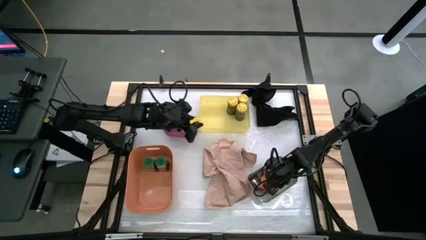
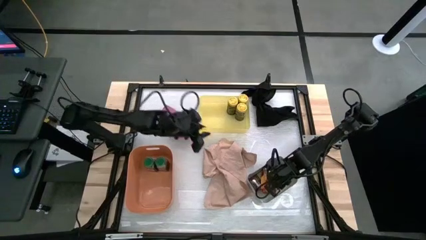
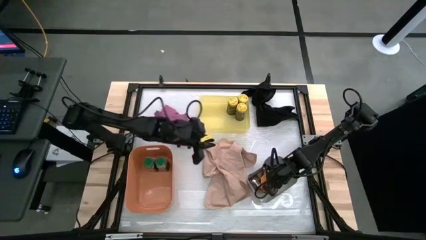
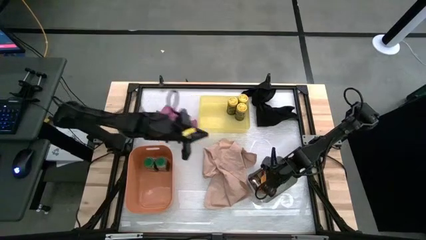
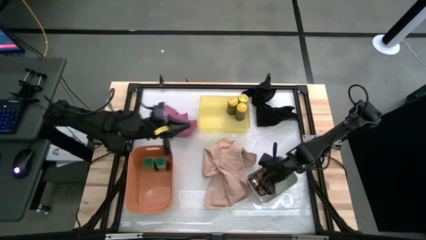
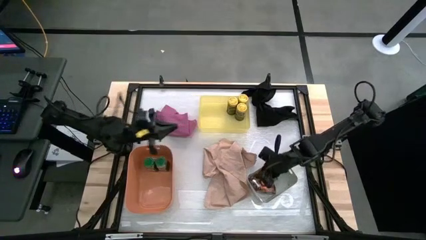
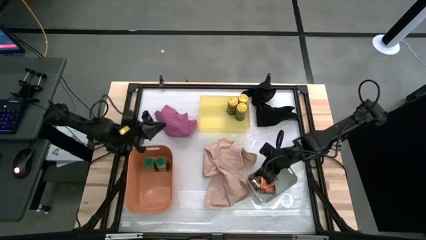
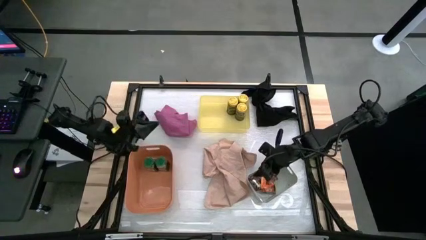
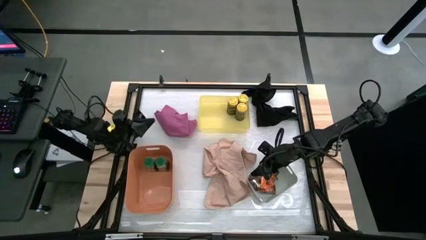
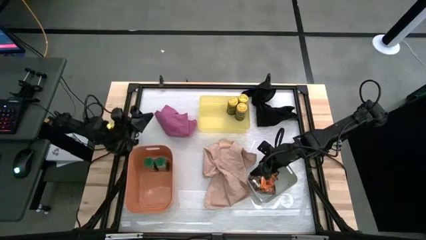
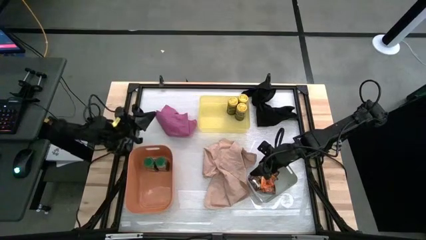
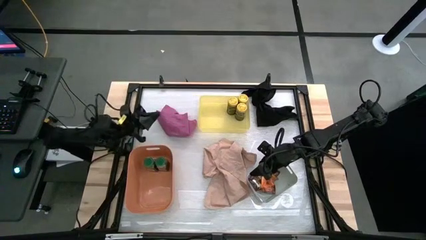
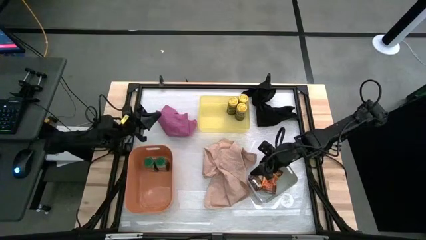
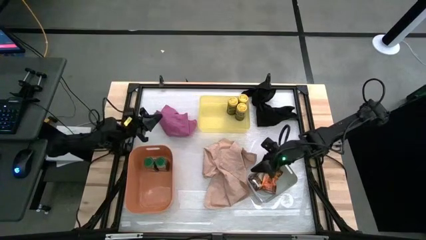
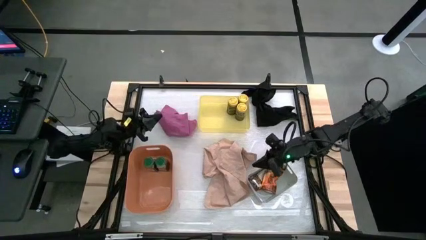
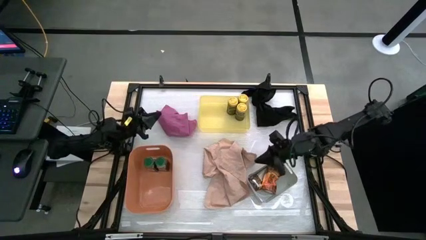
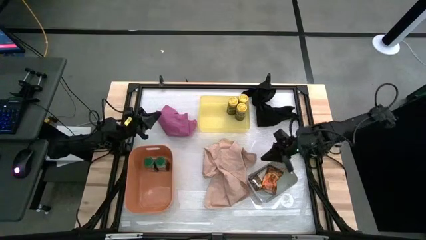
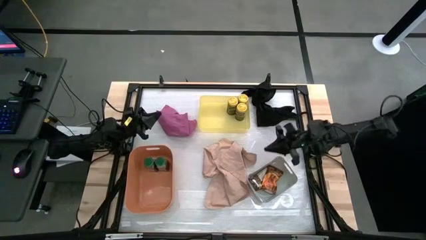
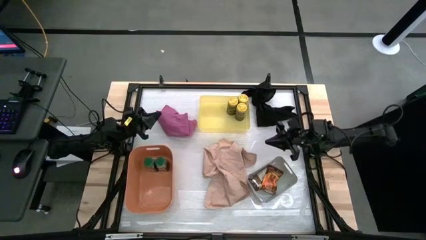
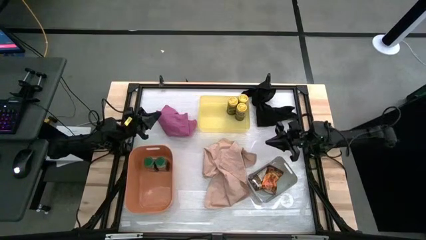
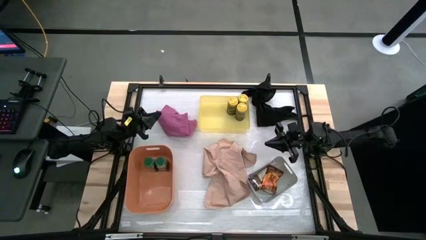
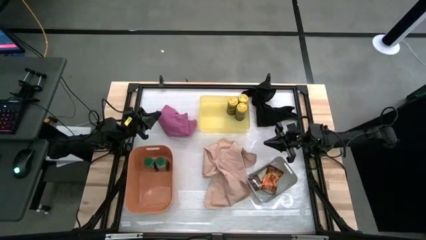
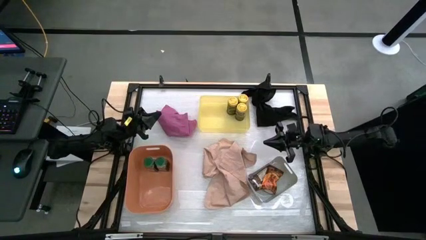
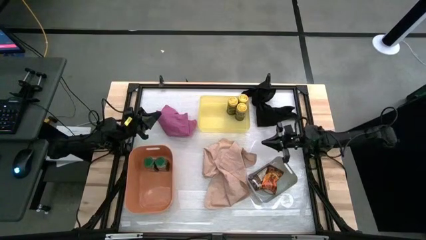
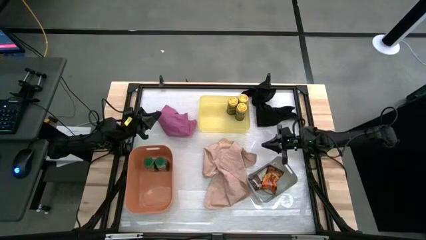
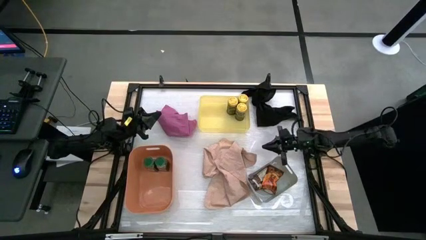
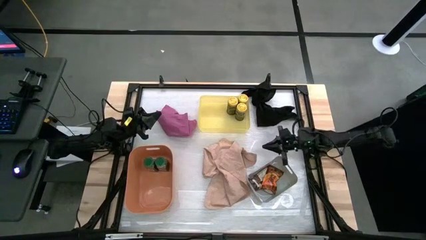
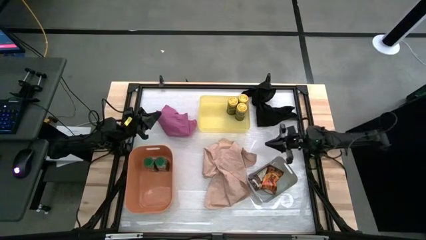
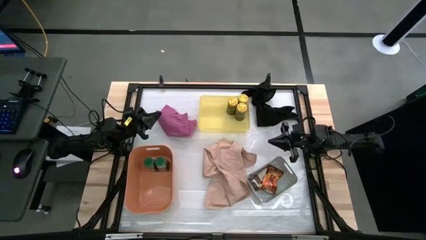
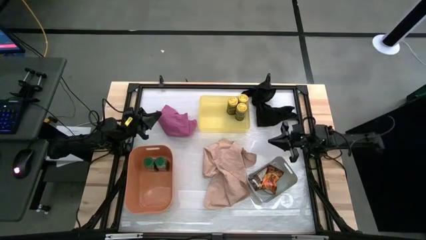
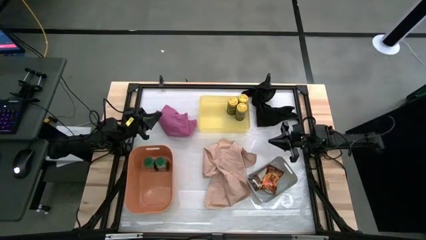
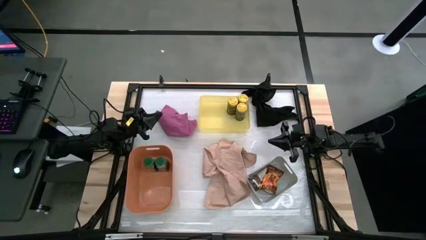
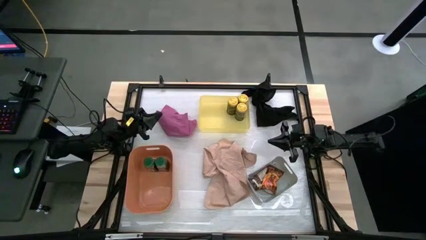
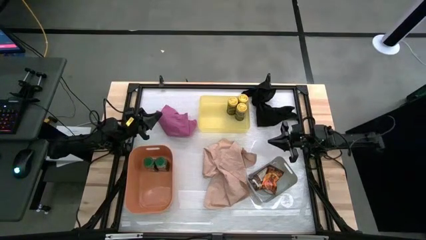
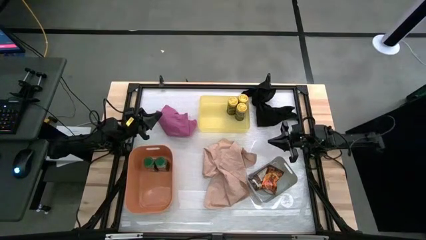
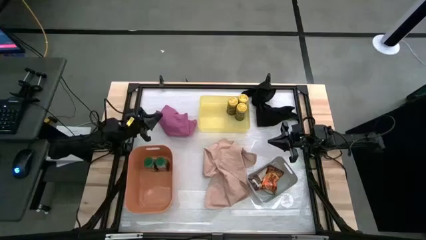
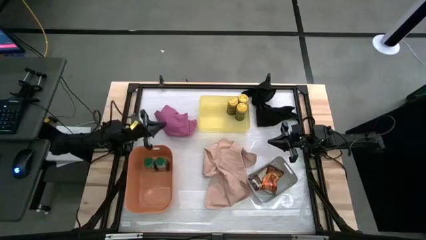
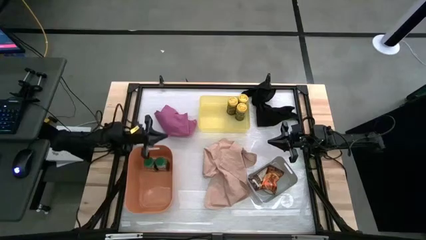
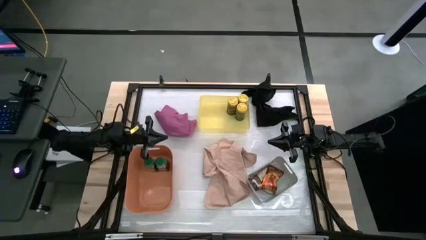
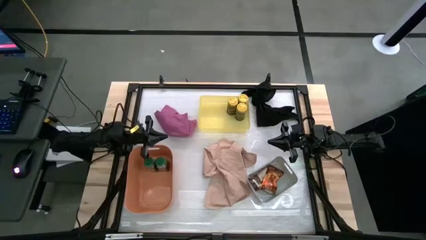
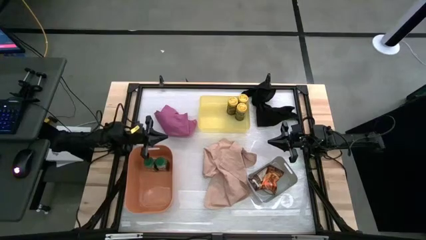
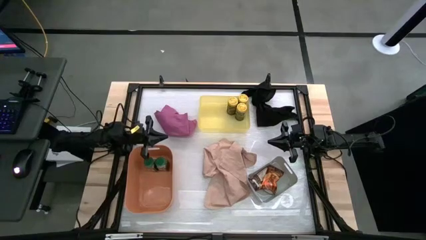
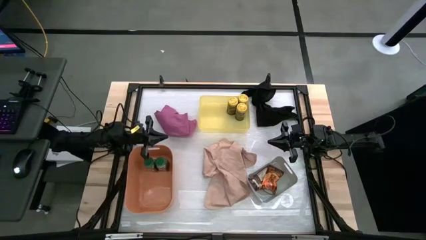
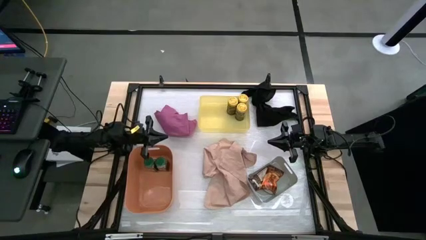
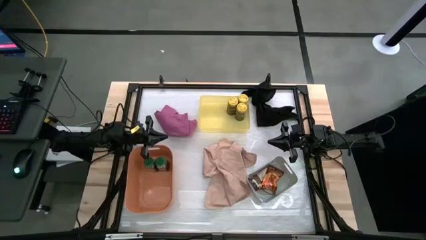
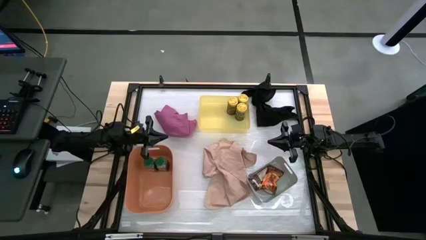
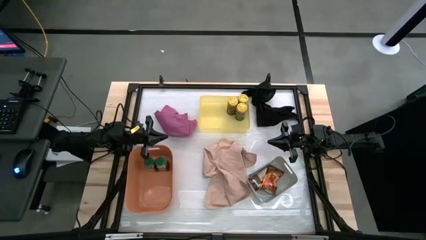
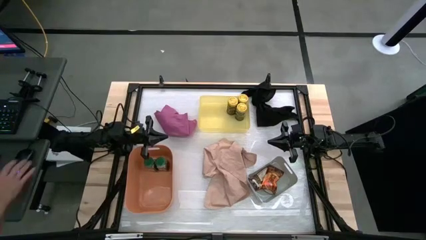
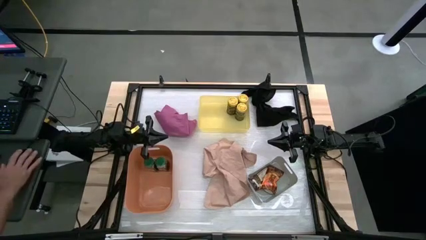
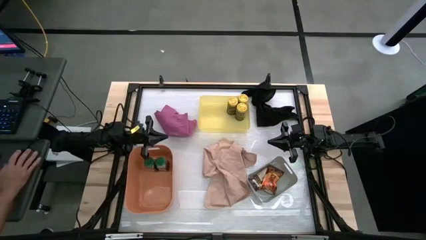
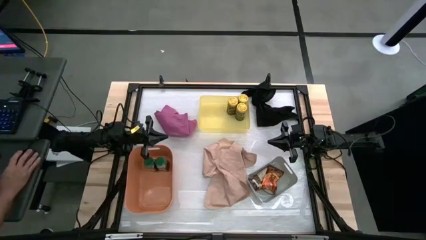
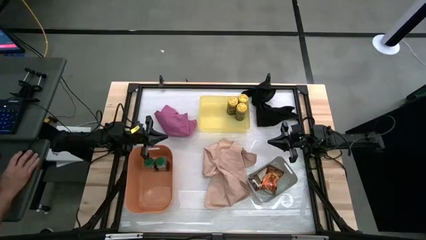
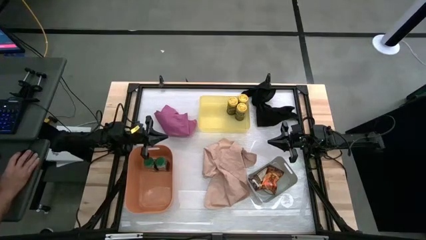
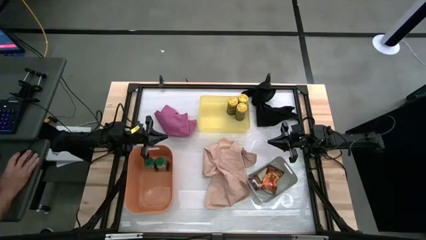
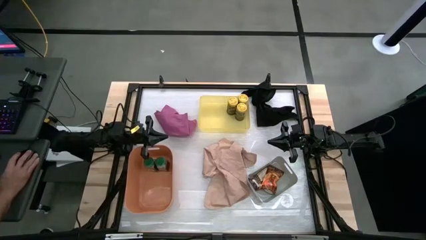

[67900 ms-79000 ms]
Task: Sort spices by type
Return to Home Position

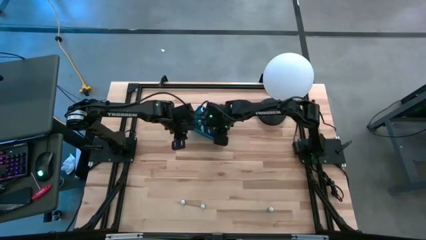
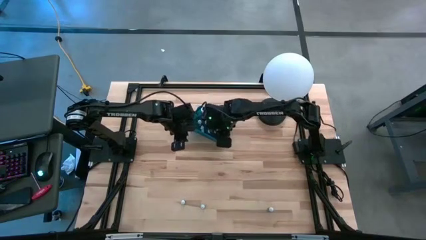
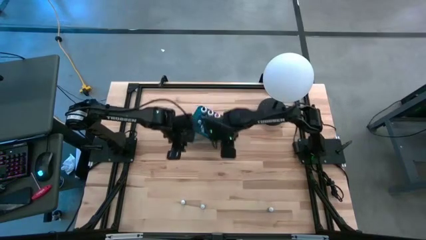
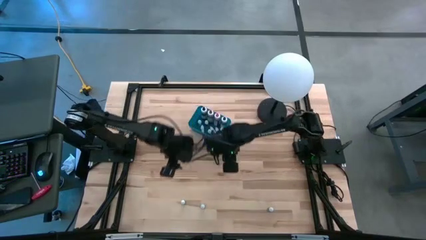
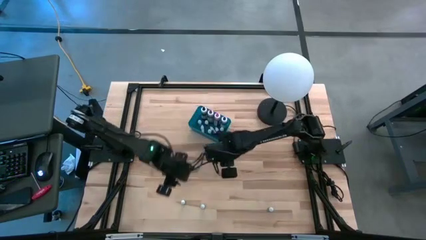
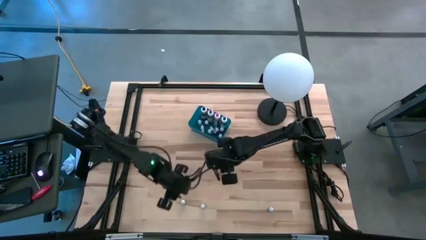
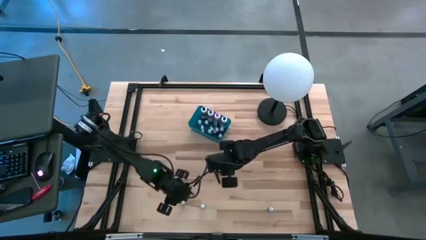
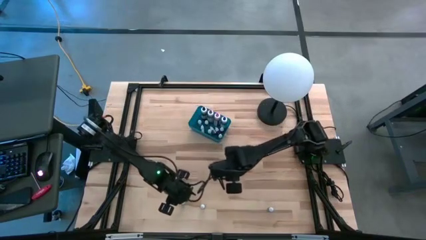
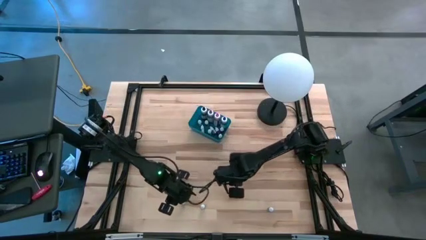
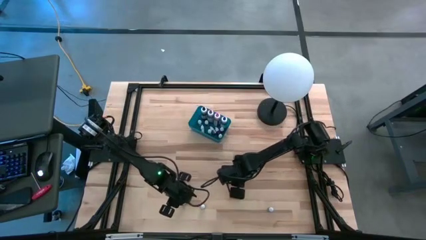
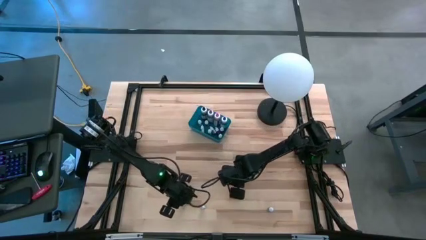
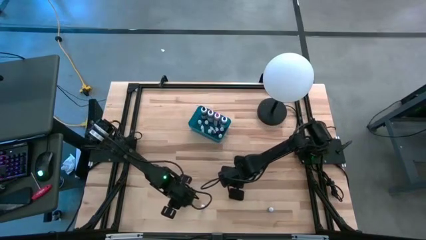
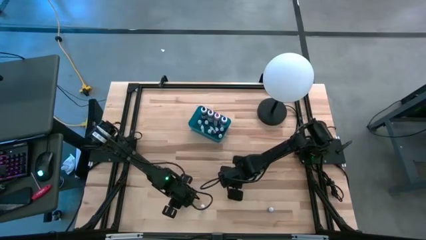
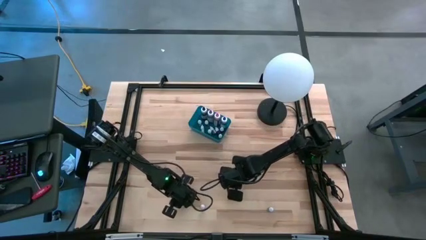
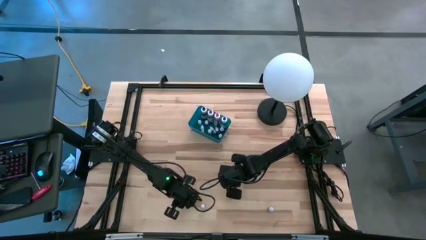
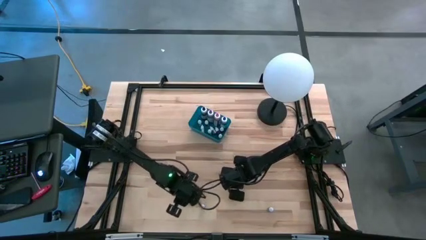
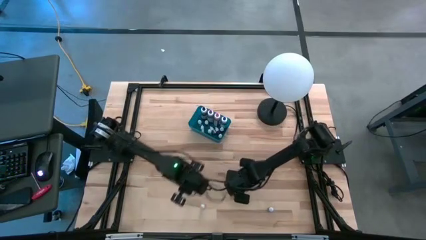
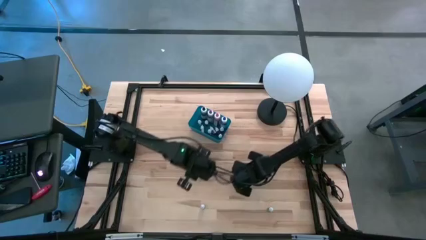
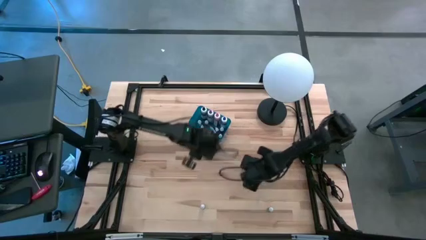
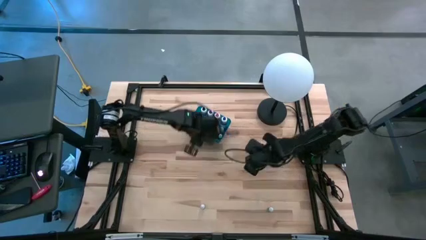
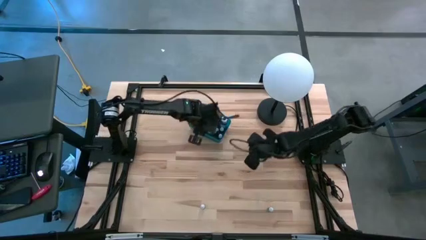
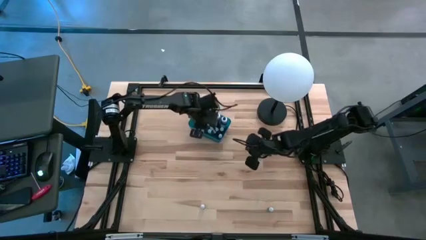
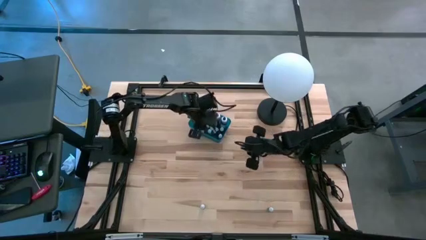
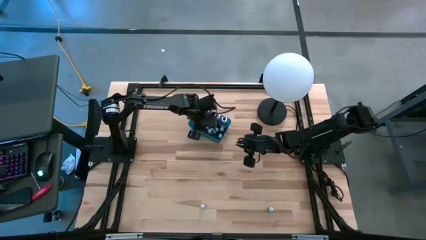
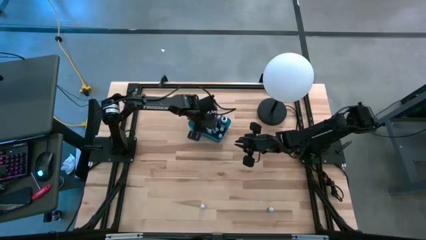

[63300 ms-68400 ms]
Task: Pick & Place food coloring
Put the small green food coloring bottle into the blue bin
